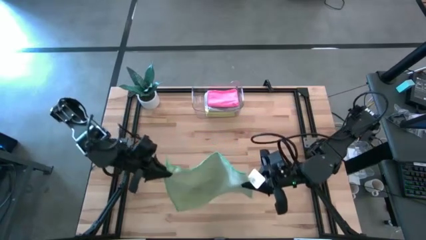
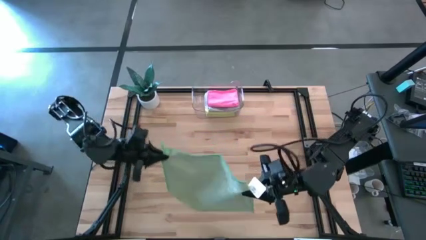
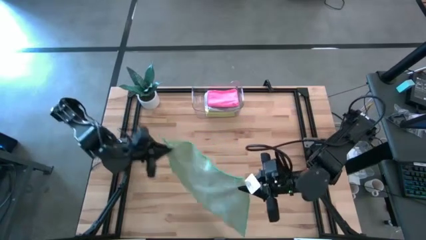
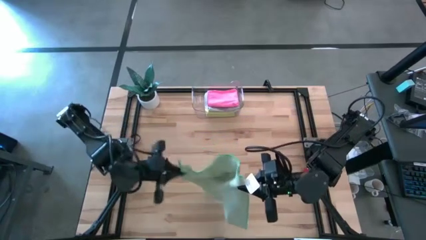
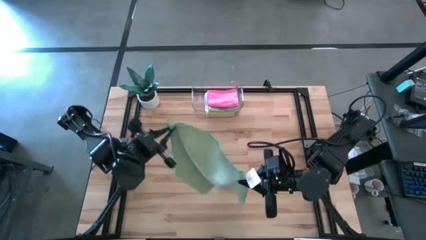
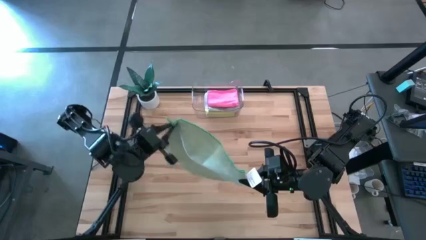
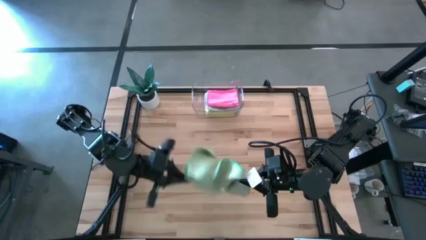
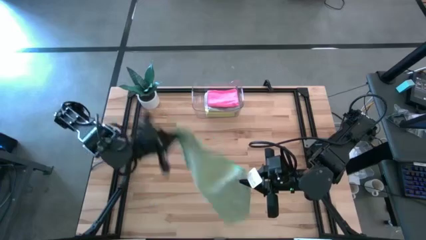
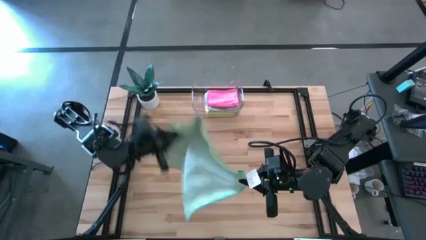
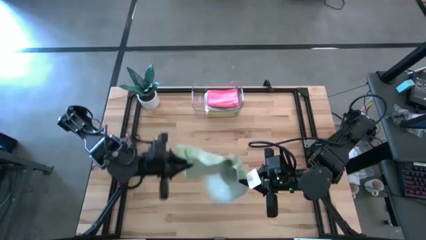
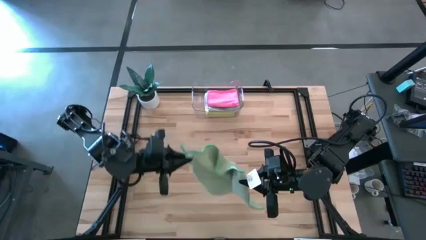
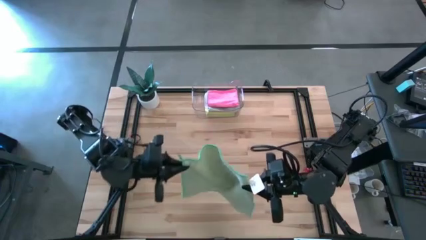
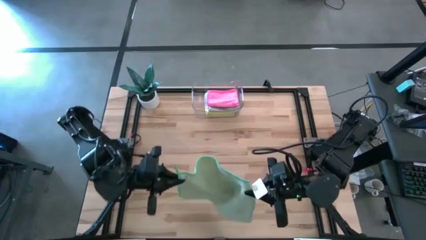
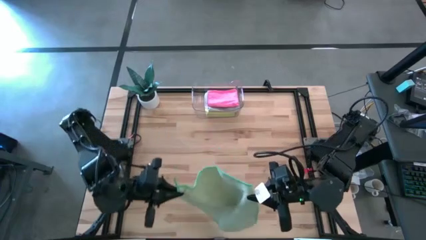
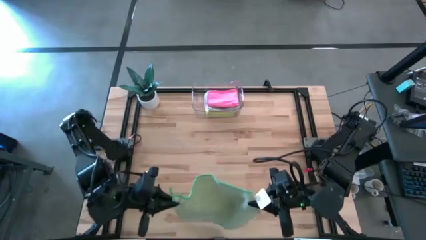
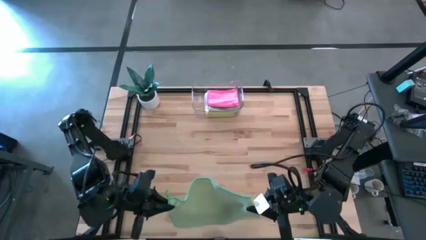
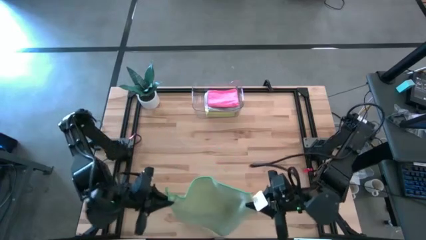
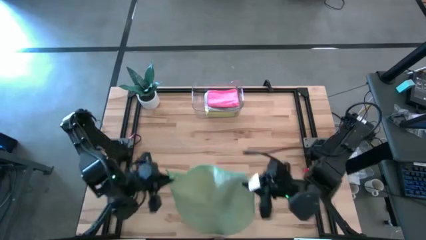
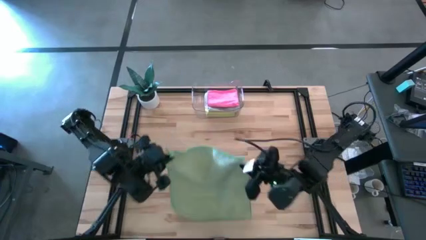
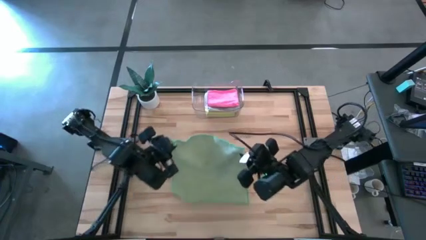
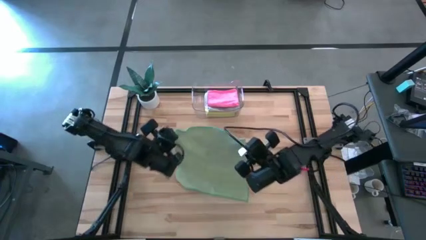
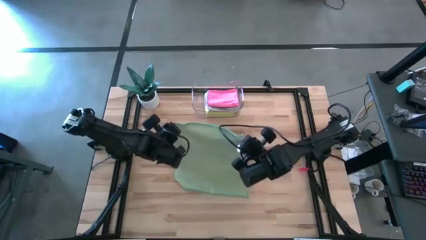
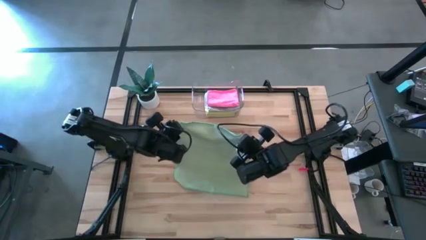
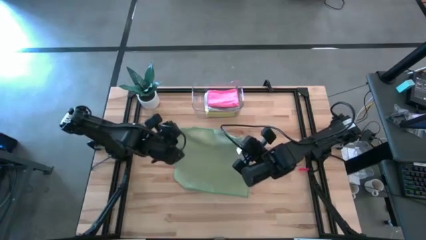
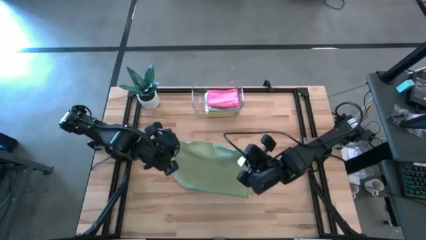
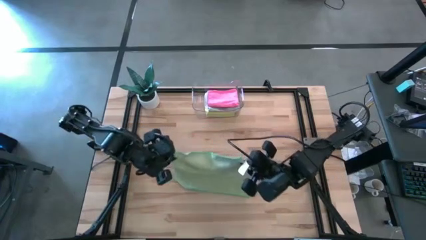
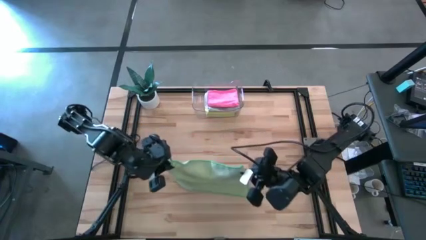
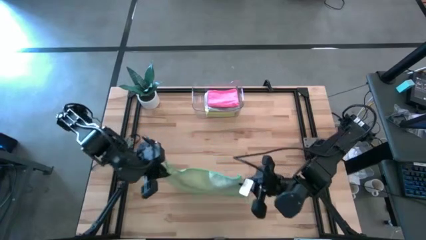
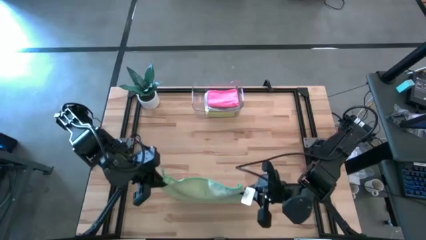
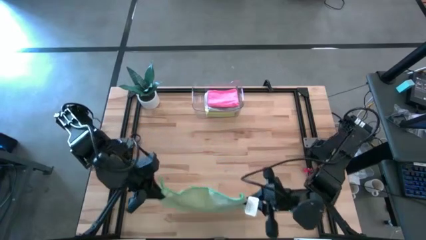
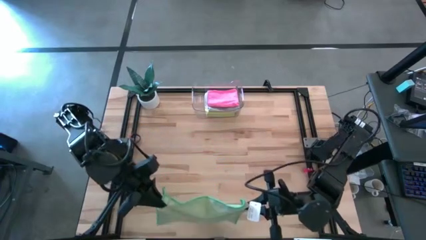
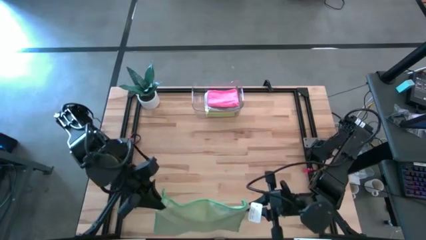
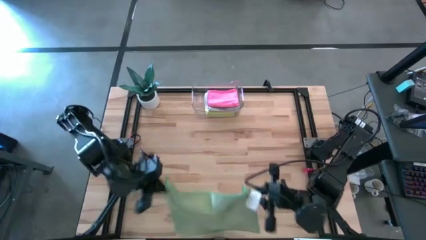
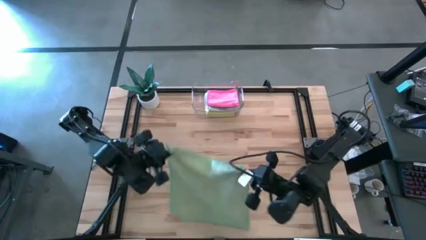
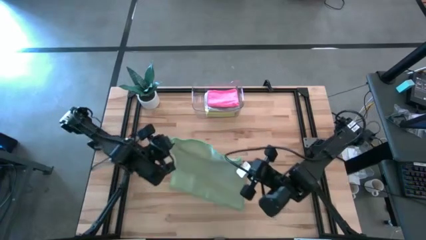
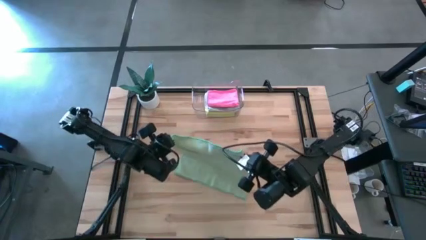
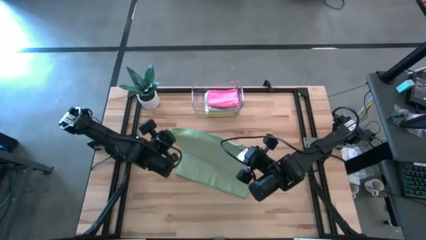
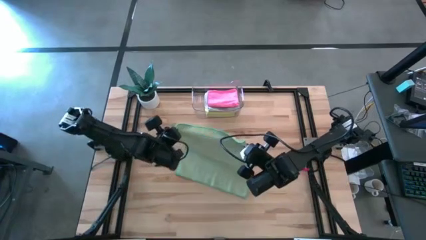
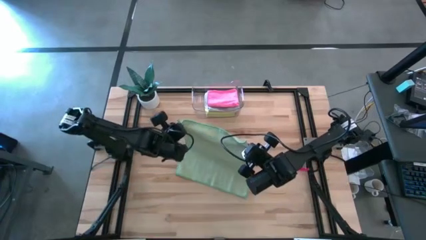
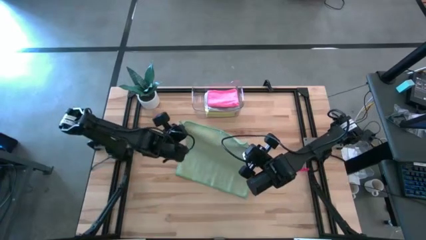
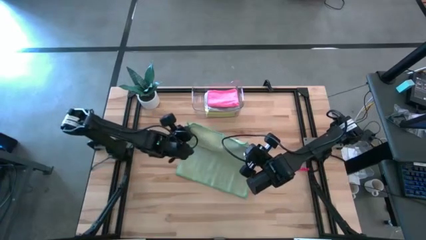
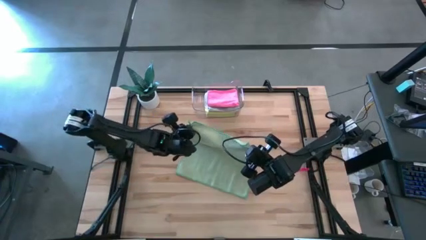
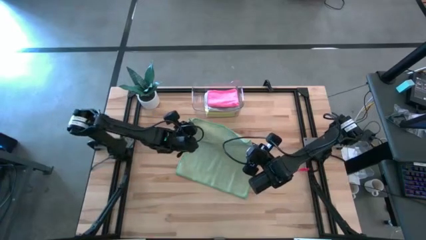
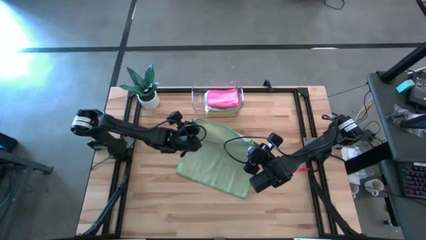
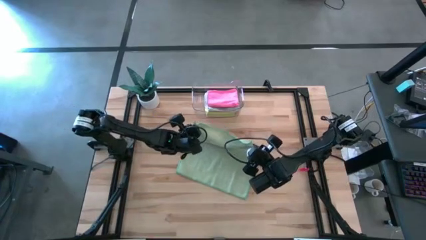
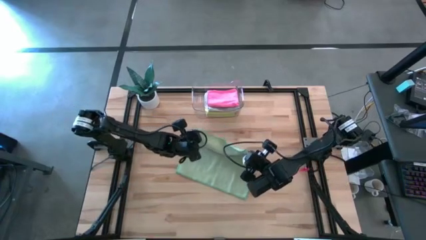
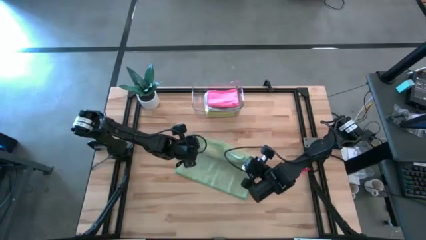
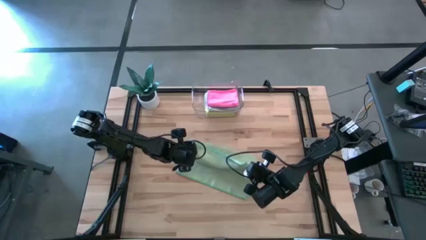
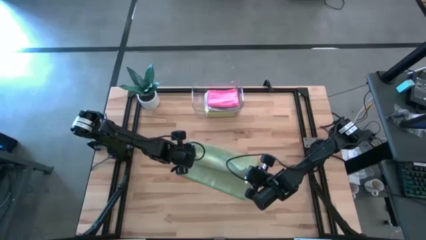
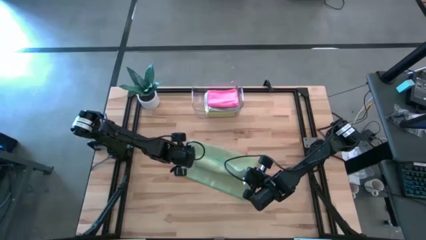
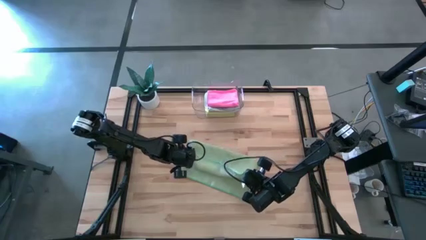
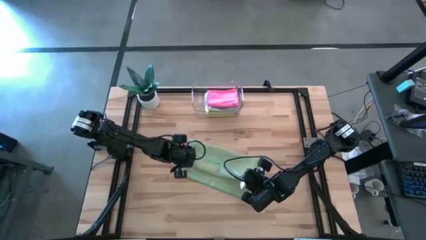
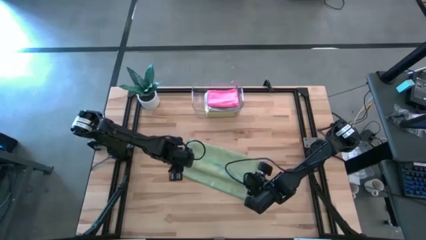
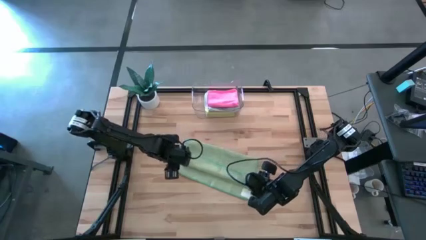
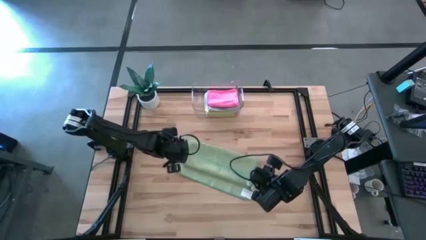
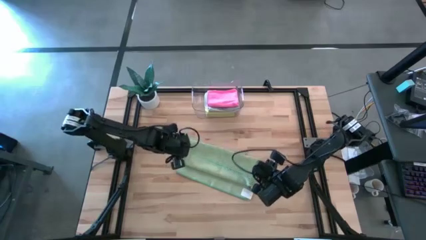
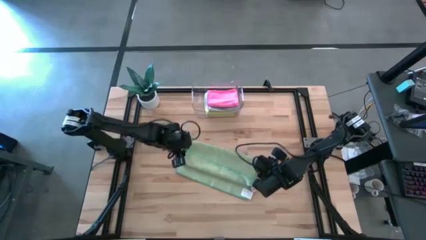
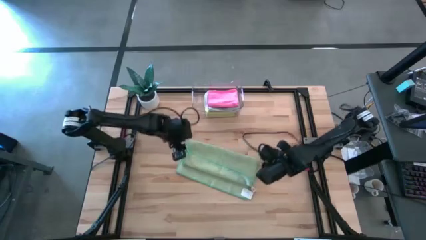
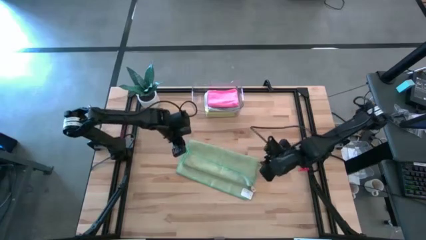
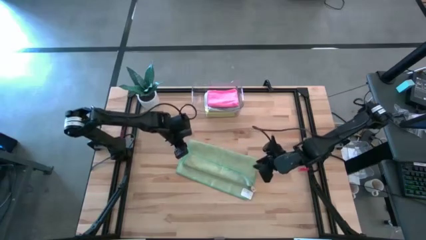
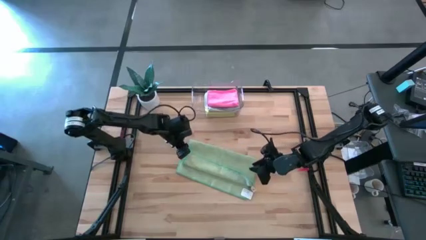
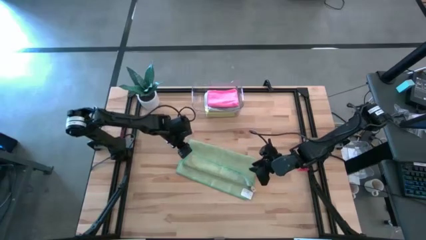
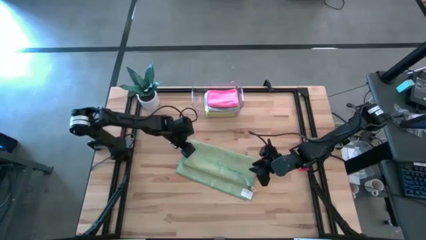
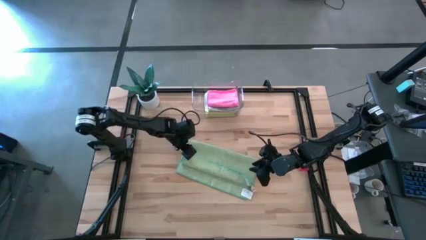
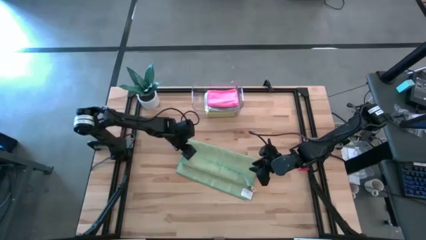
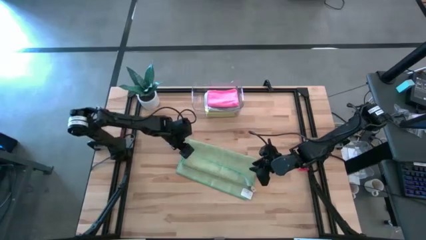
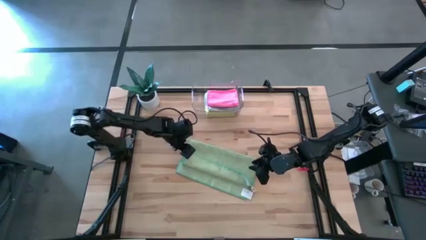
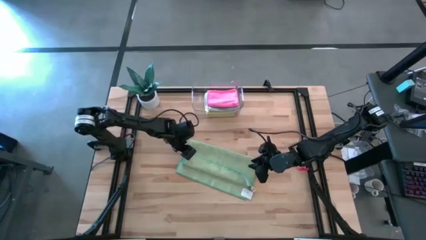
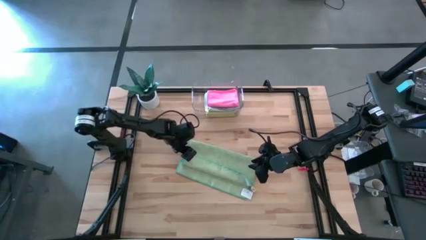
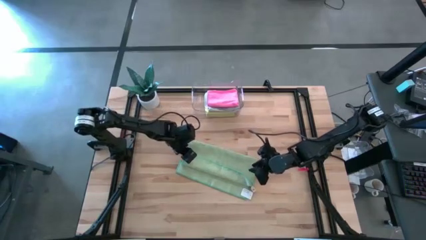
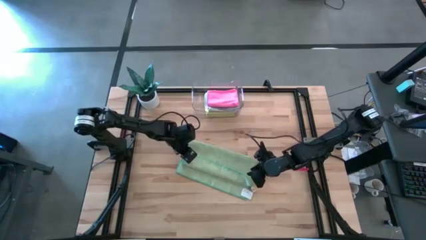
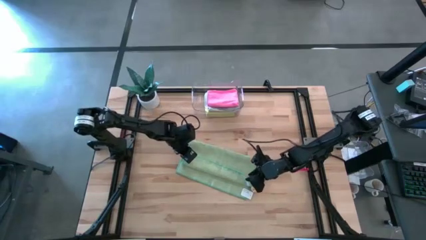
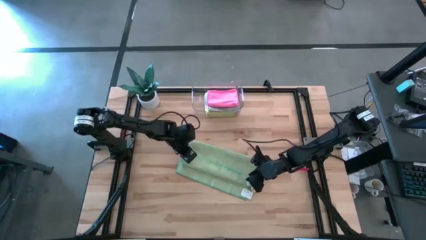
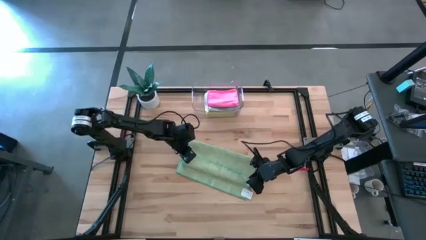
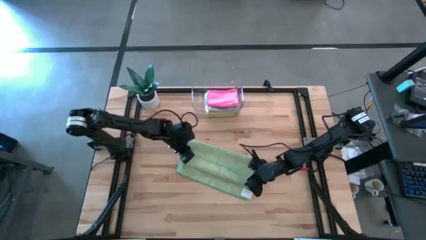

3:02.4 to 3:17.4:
Task: Fold microfiber towels
Fold the green microfiber cloth

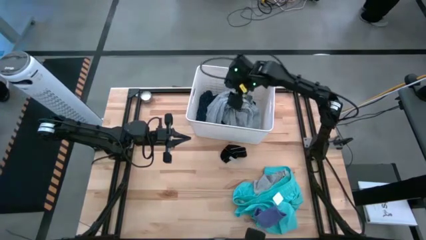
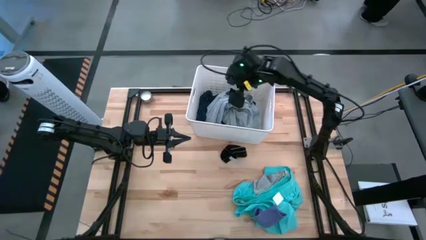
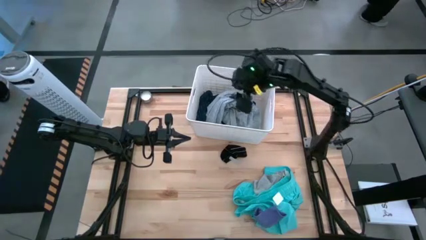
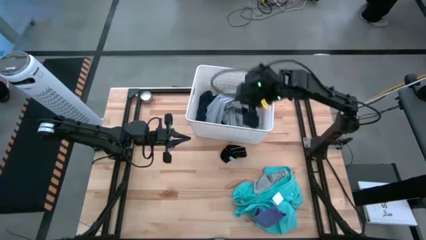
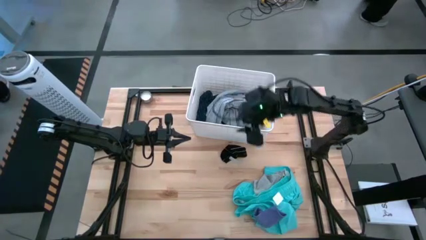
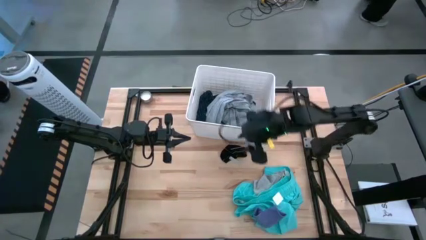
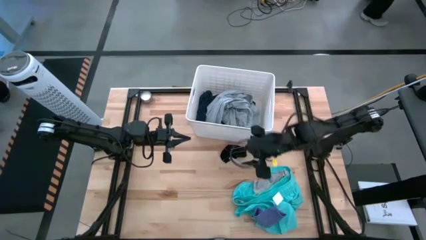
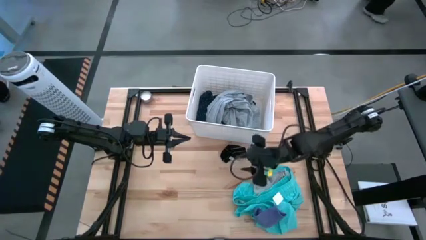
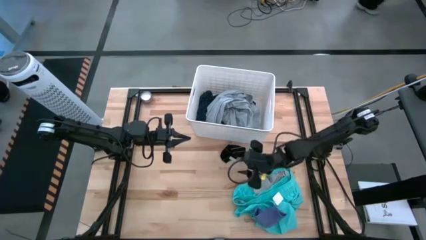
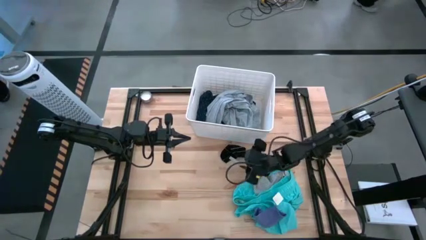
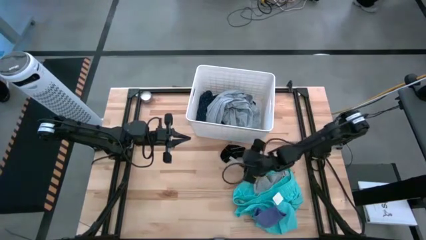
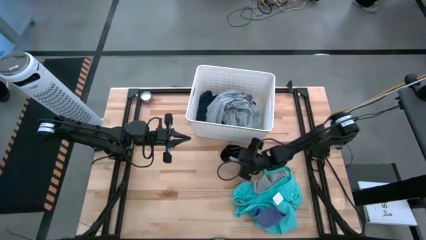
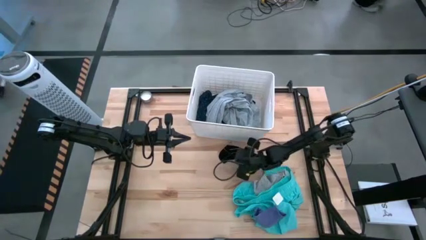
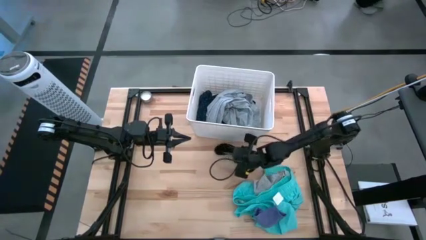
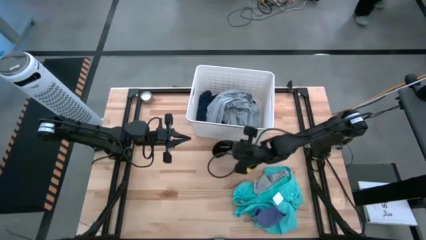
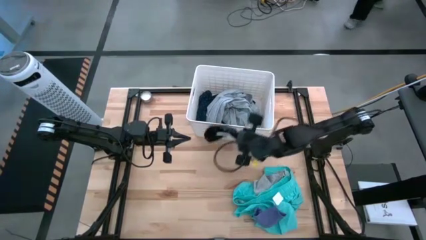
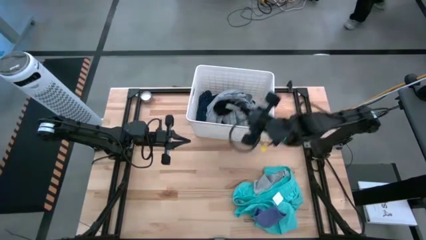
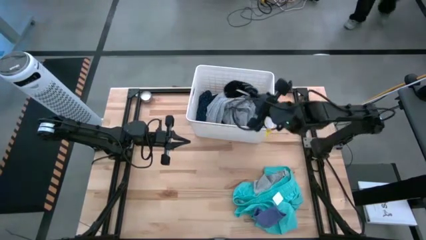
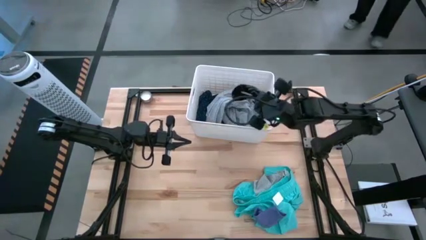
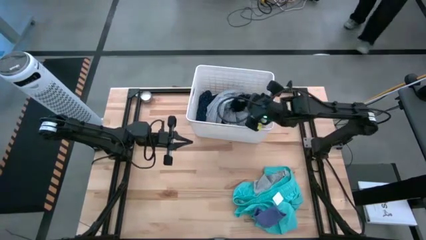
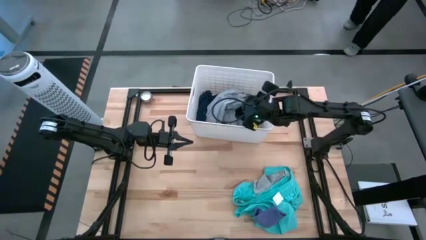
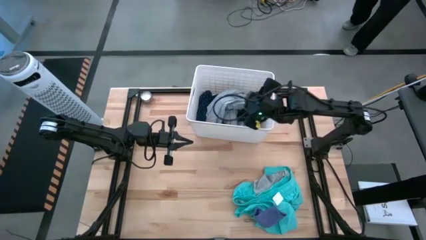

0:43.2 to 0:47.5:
Task: Sort clothes
Put the black sock into the laundry bin
